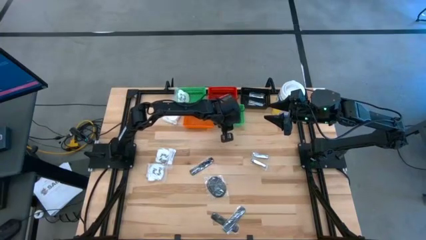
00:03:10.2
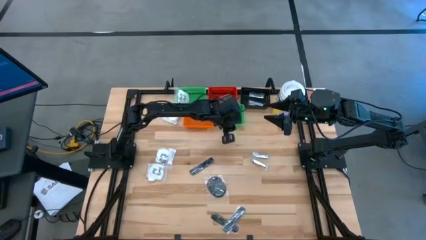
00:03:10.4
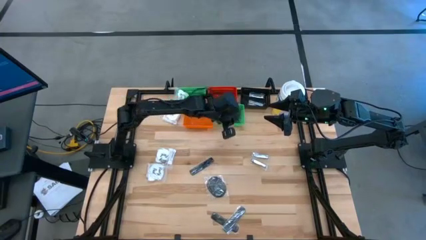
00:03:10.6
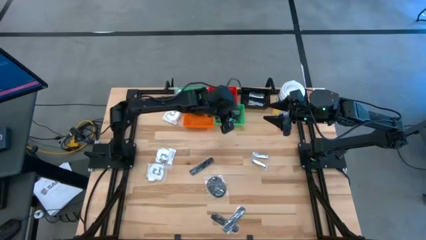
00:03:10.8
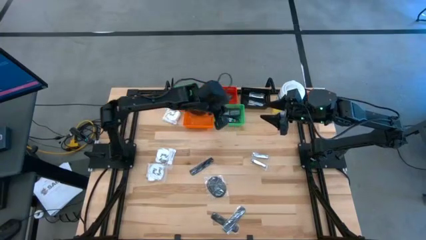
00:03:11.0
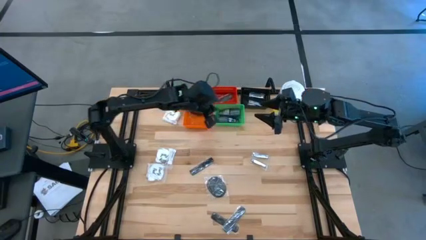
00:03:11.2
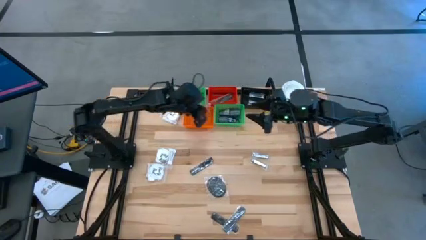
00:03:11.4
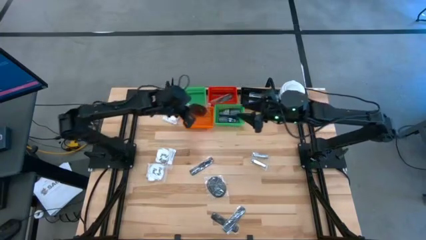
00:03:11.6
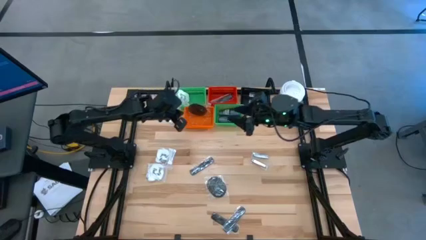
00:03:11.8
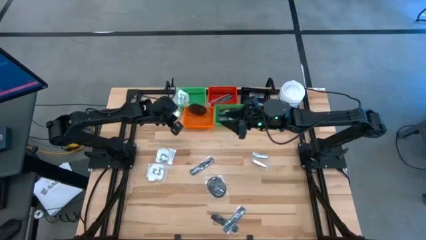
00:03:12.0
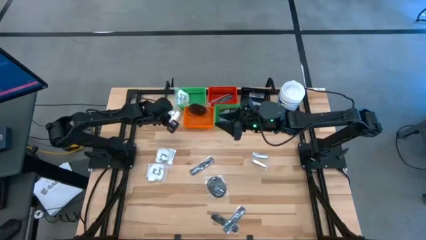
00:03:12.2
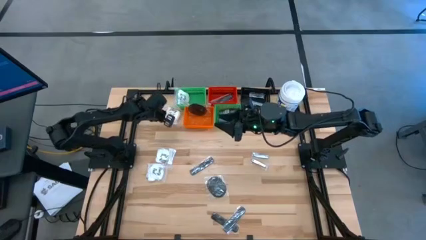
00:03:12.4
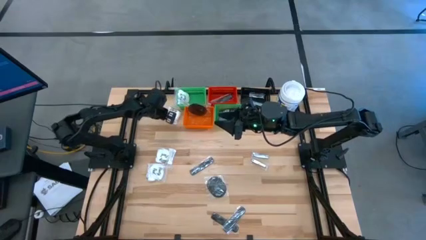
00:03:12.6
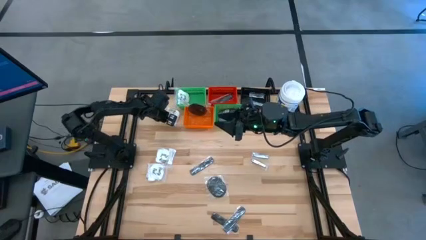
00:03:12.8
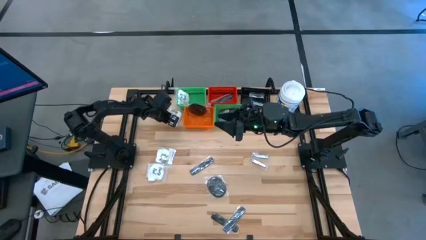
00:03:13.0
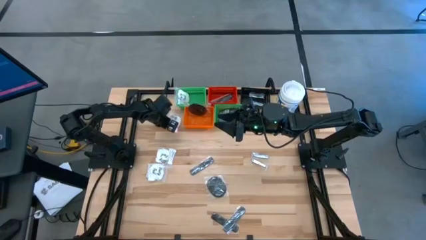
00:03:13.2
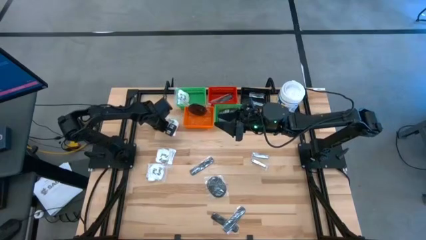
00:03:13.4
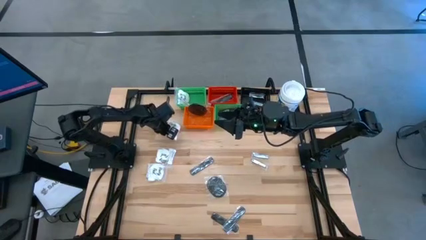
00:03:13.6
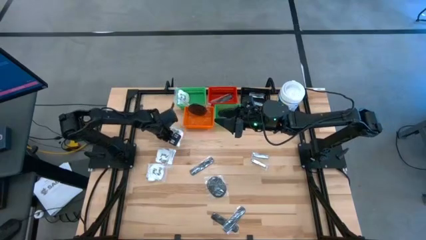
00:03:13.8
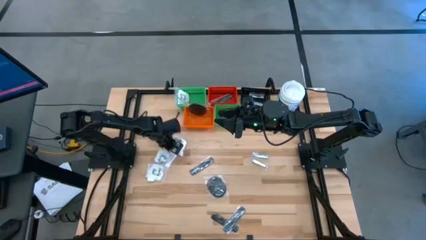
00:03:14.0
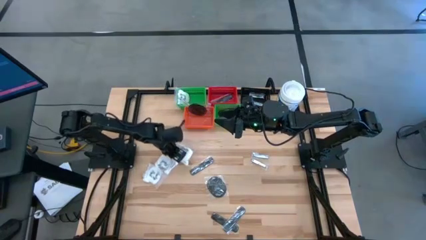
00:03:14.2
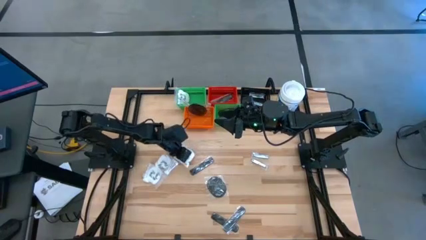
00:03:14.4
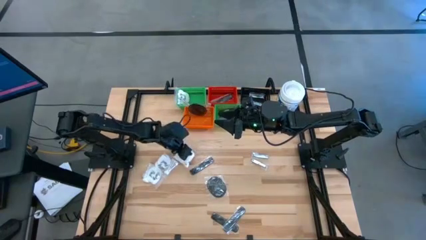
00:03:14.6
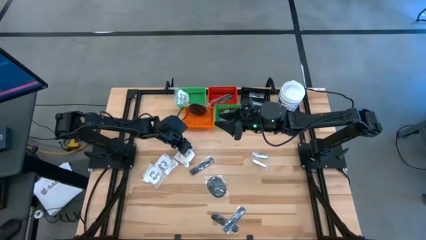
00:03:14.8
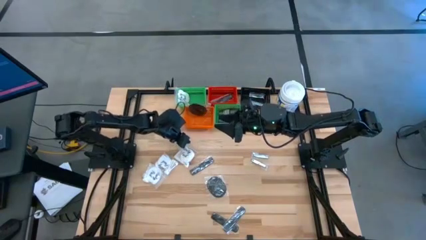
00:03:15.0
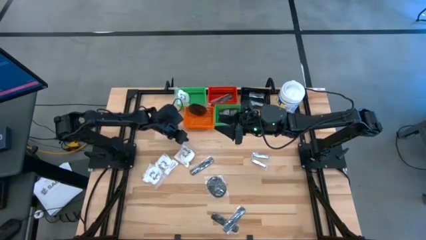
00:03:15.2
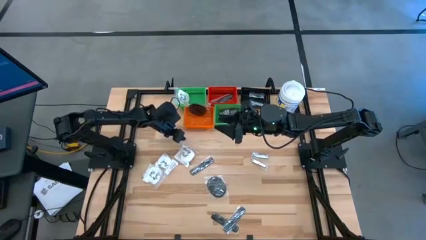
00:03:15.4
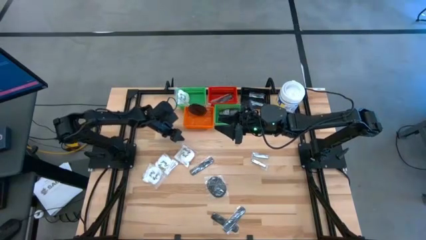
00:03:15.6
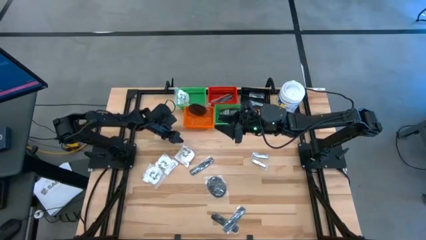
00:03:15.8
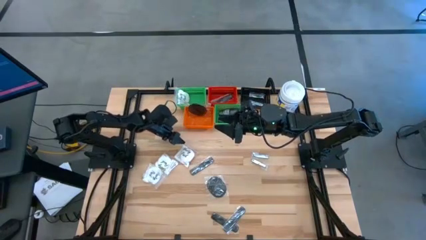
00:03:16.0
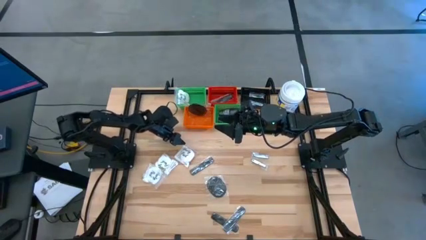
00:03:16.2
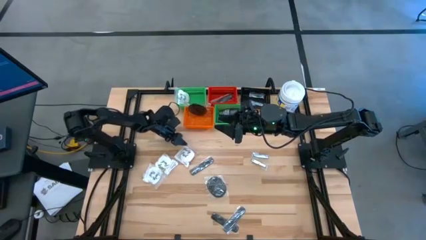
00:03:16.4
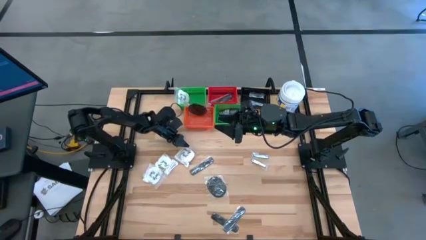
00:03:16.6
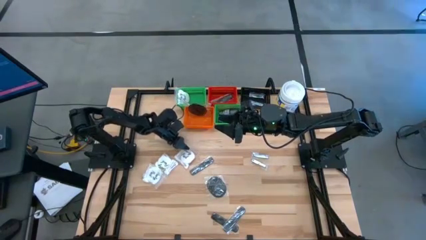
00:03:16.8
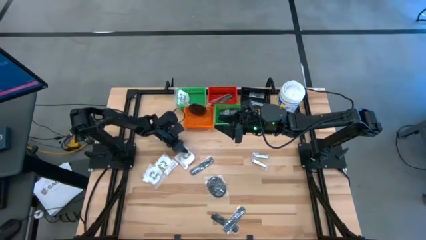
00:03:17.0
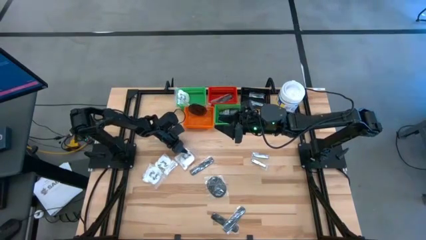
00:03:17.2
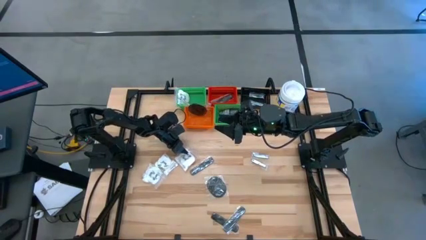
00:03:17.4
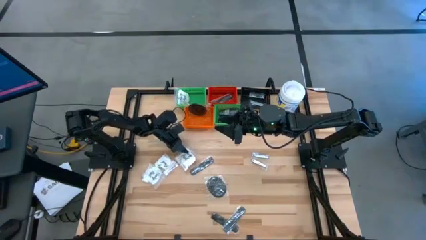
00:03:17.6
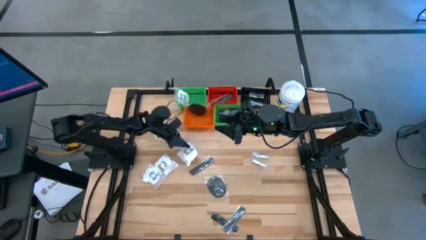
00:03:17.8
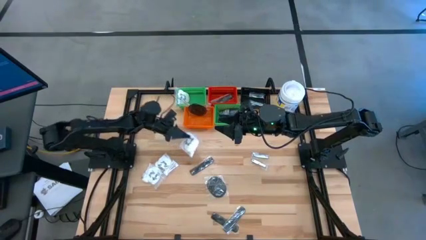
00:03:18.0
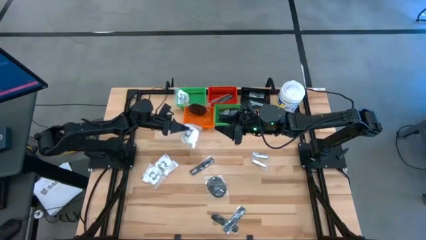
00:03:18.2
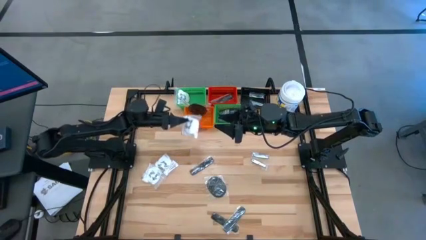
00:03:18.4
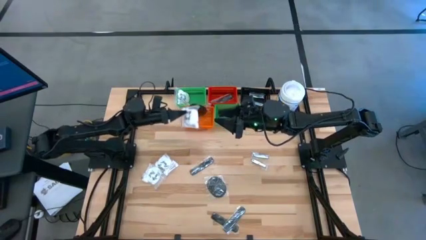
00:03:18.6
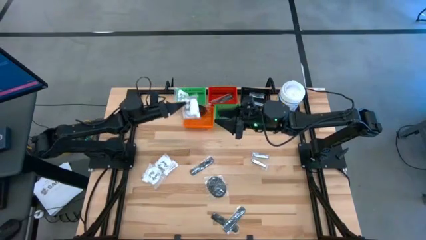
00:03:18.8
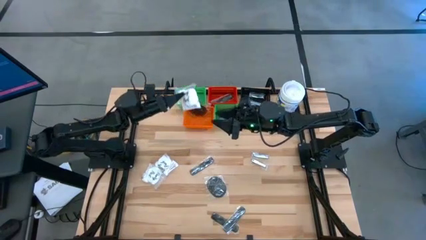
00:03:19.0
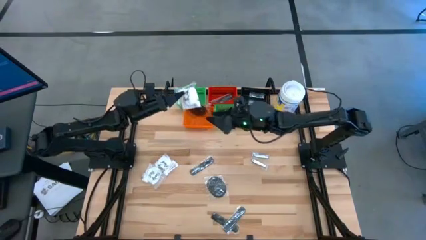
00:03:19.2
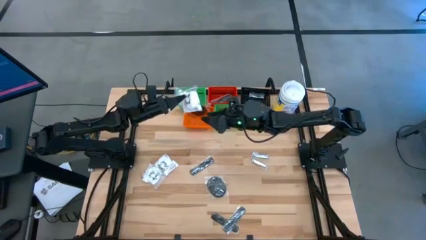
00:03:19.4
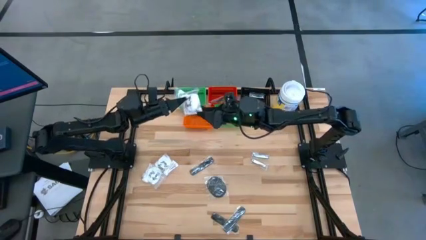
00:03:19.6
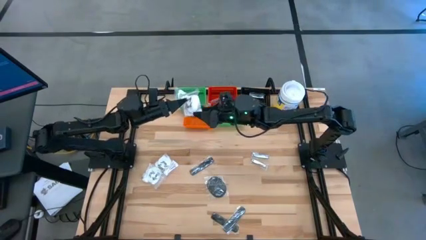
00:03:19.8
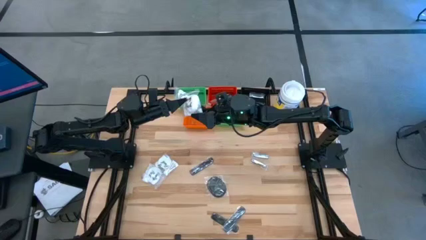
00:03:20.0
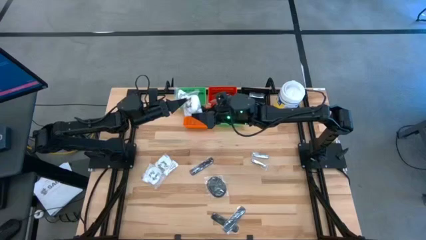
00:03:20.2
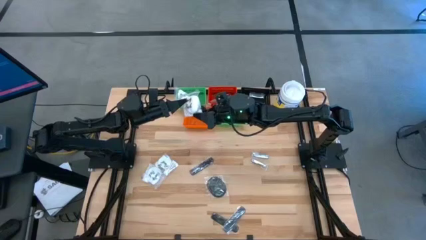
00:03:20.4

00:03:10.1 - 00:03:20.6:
Task: Pick & Place Travel size toiletries
Put the vanity pack into the green bin

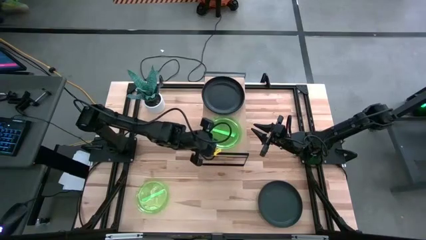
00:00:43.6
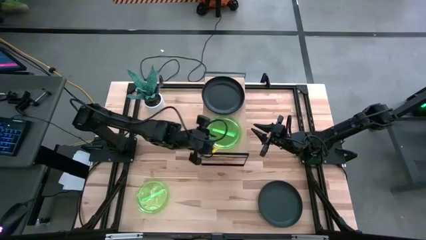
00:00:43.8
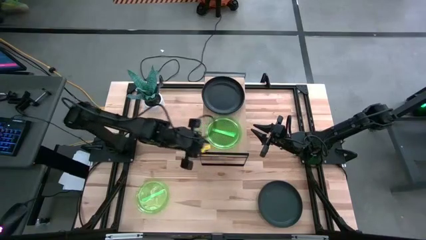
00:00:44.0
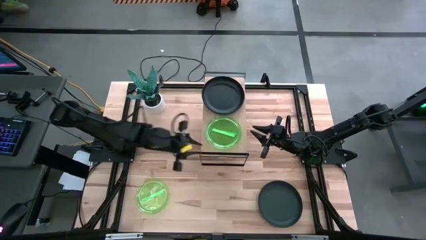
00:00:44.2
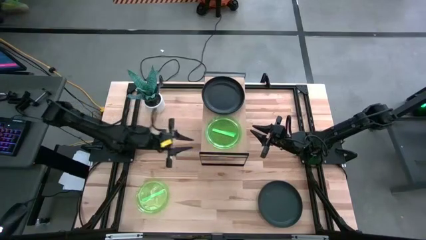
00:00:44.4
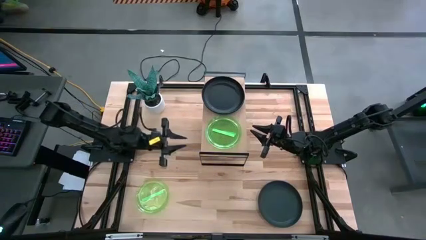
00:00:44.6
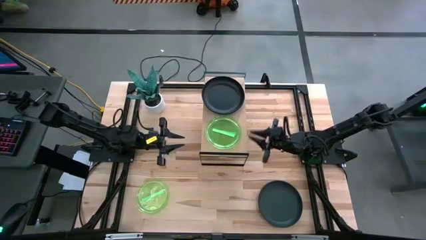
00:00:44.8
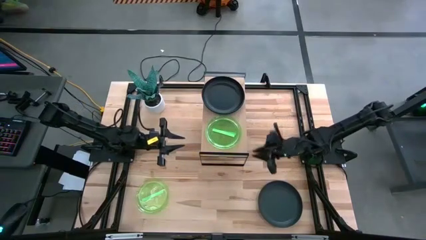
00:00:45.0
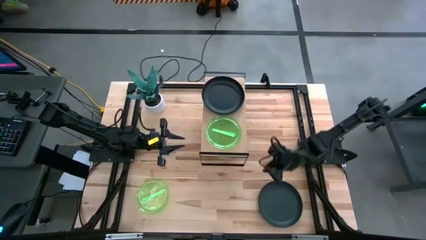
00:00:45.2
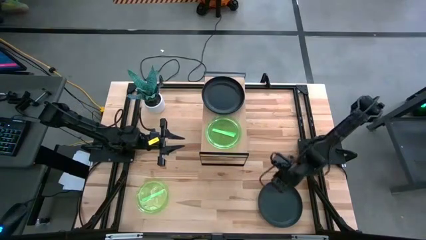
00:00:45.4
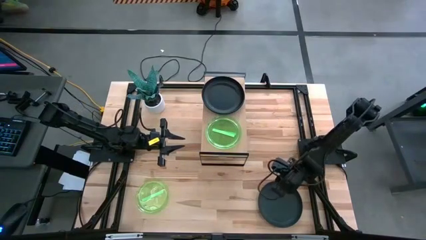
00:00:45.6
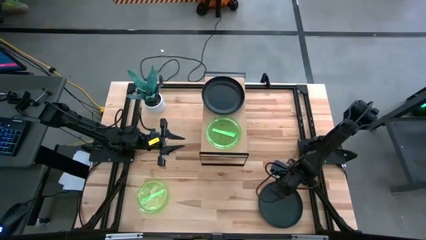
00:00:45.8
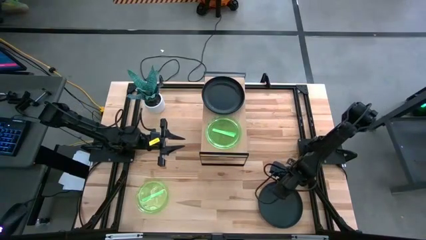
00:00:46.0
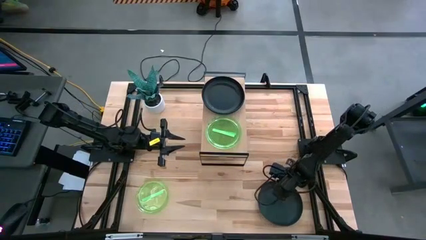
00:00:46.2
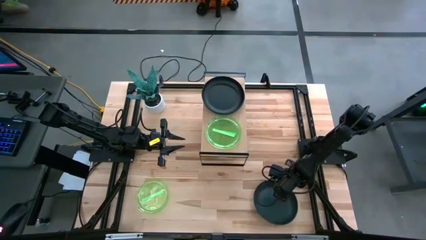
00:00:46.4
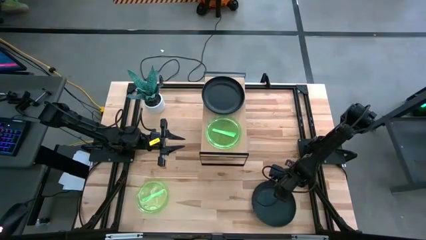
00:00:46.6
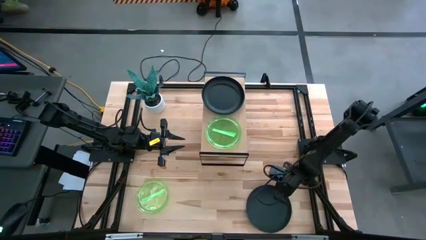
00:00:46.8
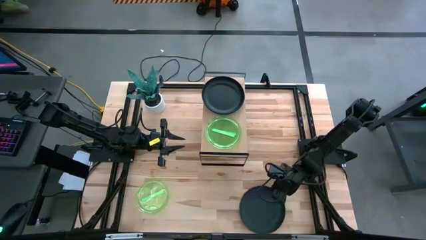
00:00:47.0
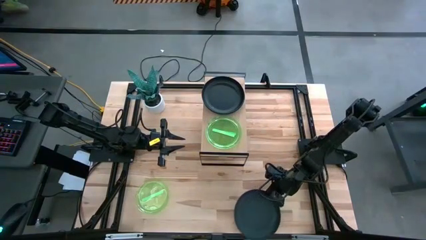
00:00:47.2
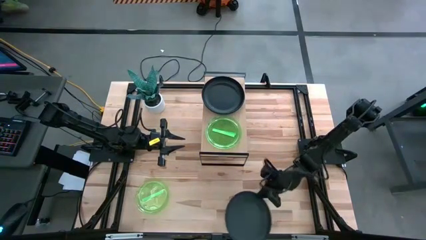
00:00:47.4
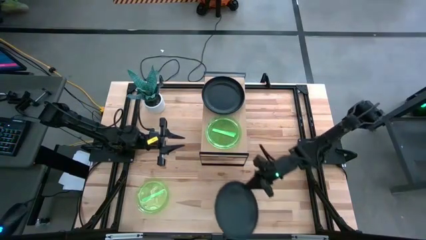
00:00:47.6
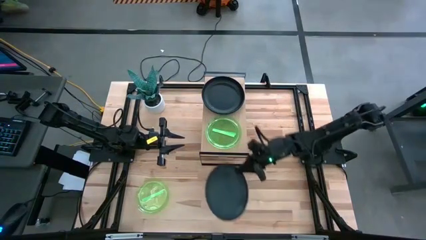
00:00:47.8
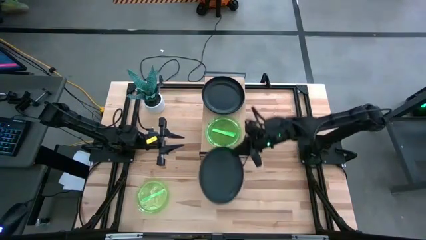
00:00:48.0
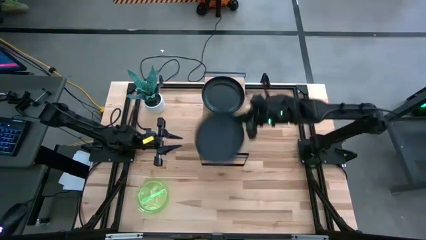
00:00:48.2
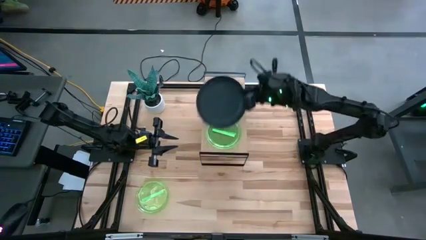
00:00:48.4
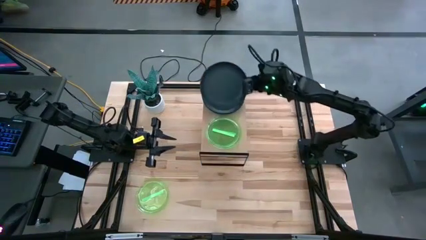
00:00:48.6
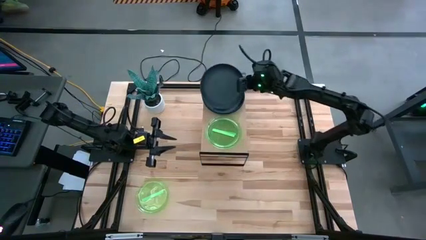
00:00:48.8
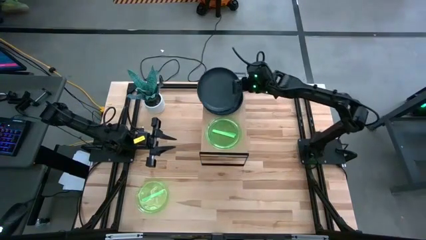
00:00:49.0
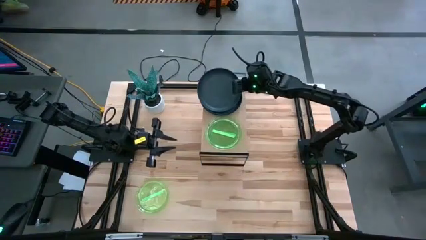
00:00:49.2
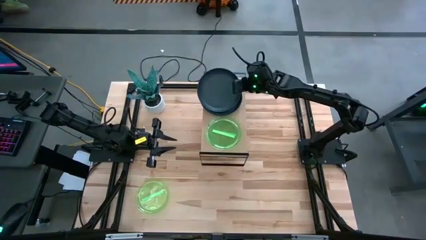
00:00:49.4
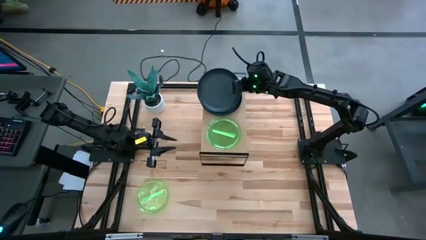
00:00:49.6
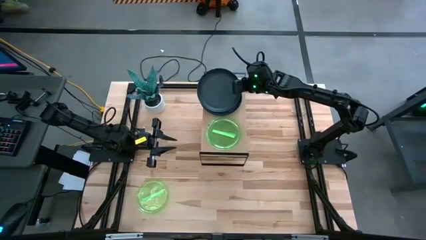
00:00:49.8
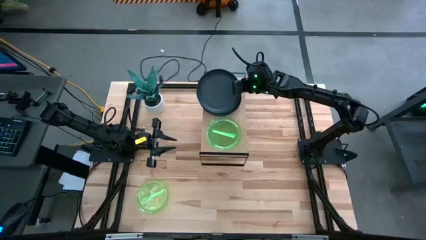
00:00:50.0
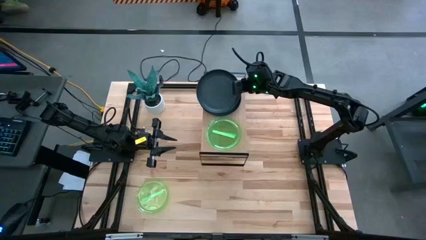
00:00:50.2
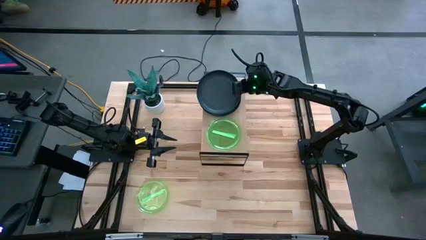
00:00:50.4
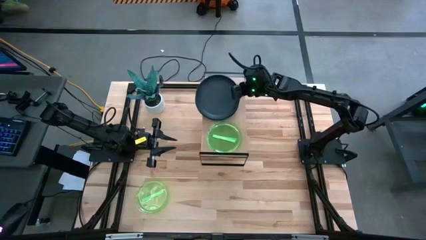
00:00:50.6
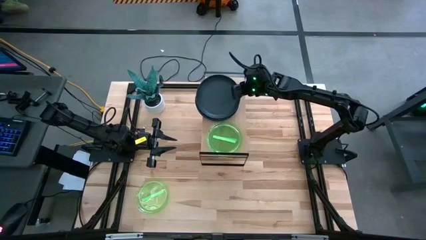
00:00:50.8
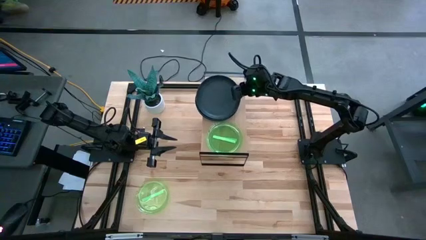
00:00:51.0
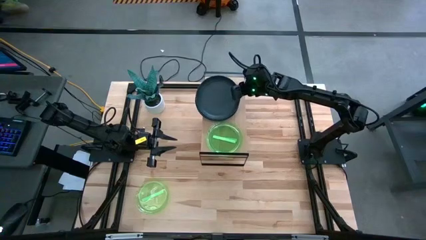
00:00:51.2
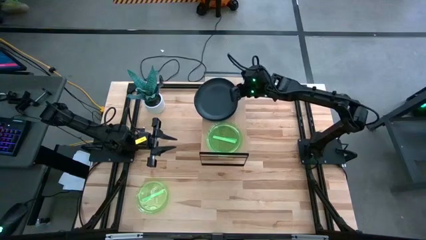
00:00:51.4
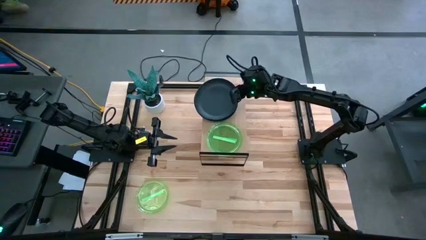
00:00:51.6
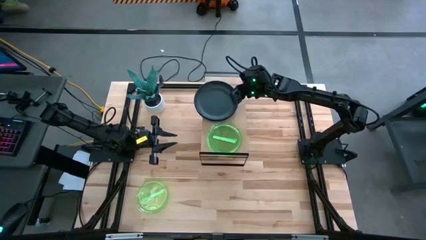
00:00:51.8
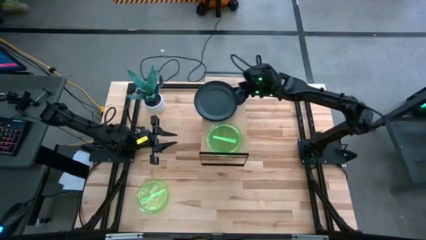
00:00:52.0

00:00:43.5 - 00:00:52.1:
Task: Place and stack plates onto a shelf
Stack the black plate on top of the black plate on the shelf
